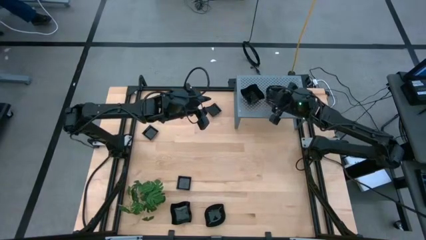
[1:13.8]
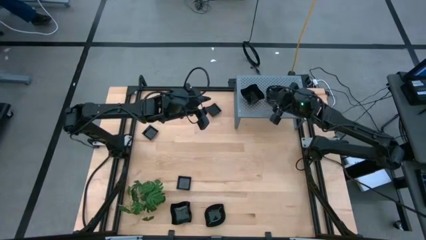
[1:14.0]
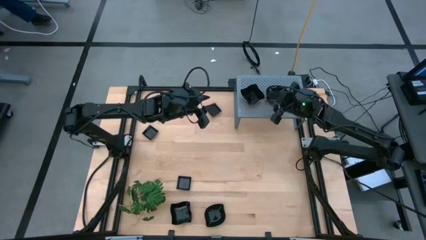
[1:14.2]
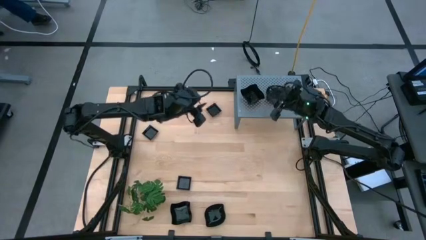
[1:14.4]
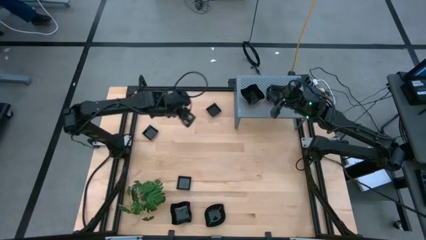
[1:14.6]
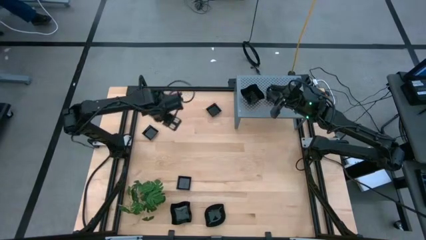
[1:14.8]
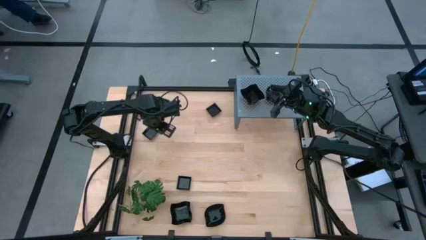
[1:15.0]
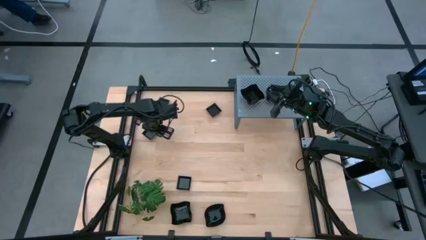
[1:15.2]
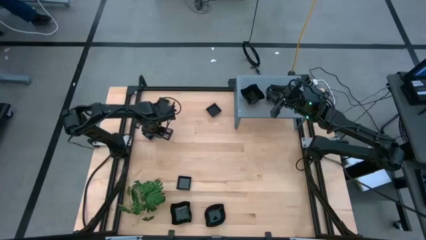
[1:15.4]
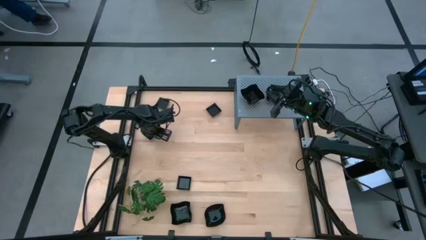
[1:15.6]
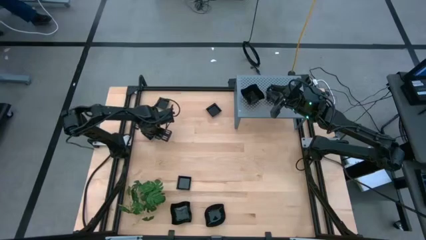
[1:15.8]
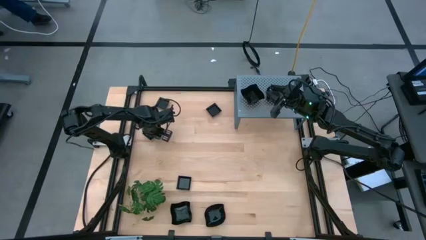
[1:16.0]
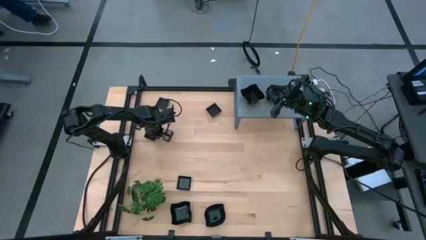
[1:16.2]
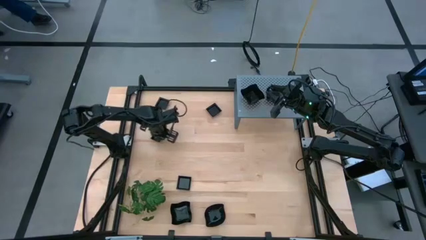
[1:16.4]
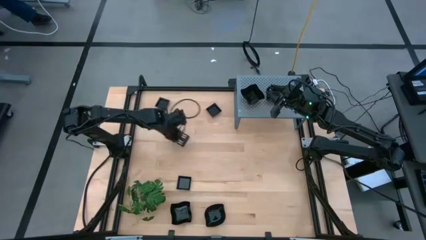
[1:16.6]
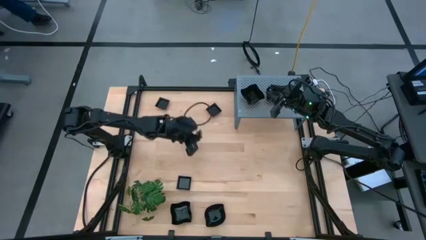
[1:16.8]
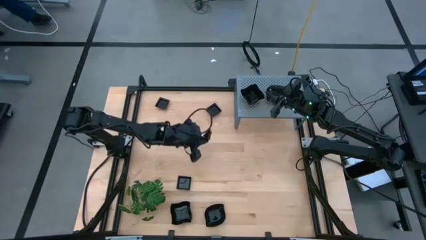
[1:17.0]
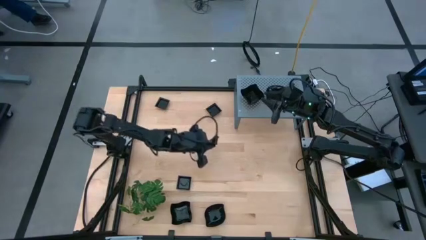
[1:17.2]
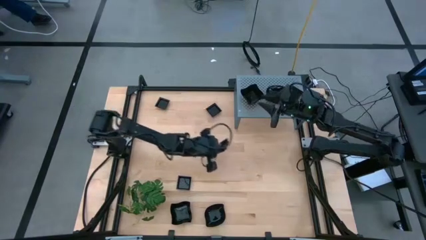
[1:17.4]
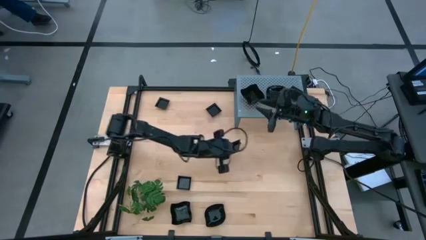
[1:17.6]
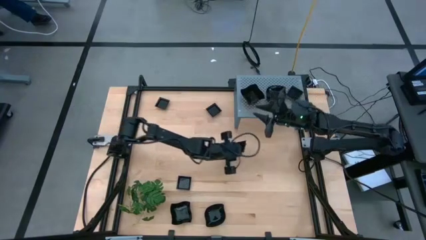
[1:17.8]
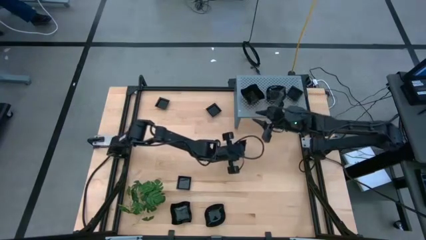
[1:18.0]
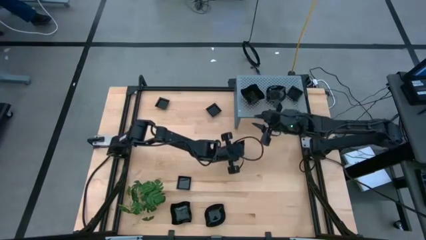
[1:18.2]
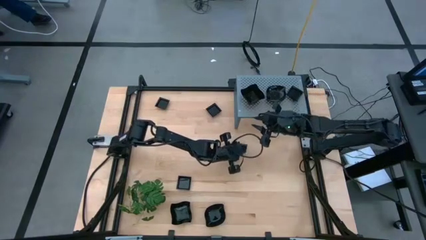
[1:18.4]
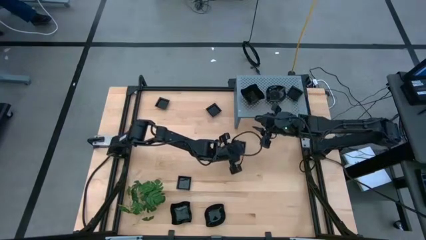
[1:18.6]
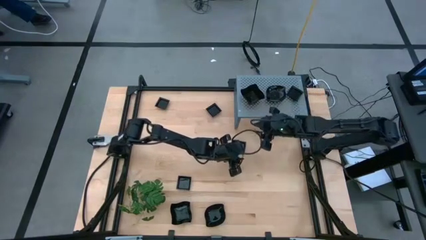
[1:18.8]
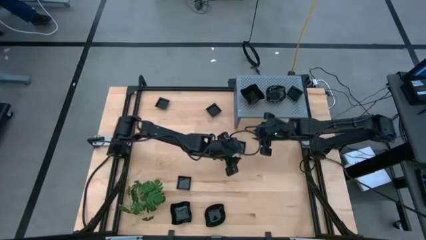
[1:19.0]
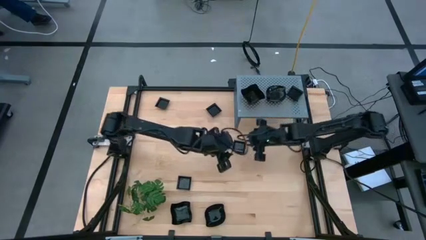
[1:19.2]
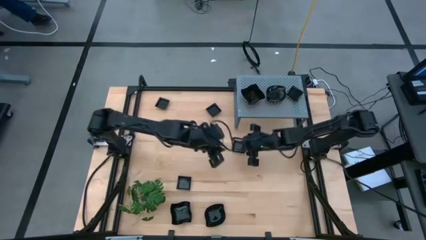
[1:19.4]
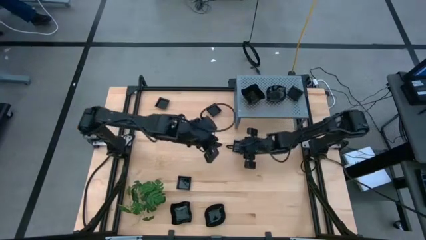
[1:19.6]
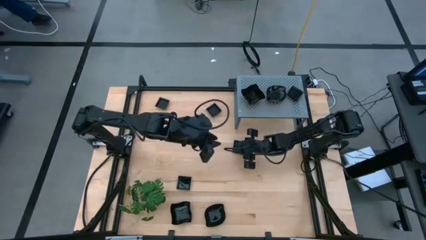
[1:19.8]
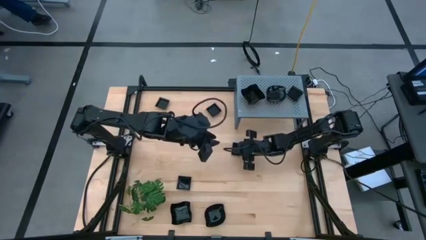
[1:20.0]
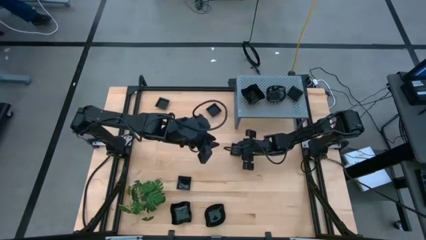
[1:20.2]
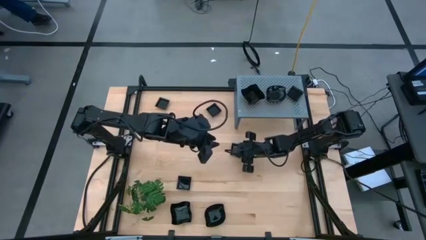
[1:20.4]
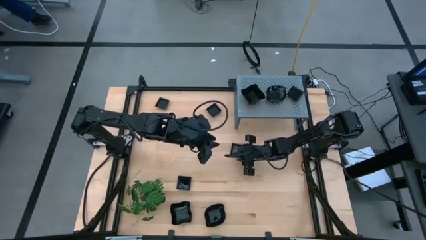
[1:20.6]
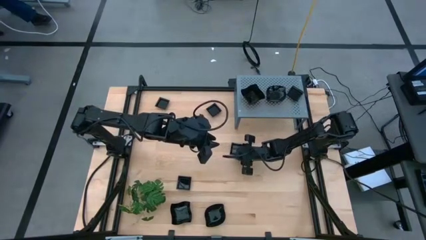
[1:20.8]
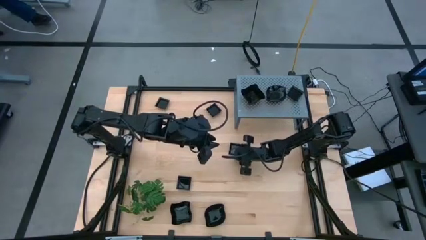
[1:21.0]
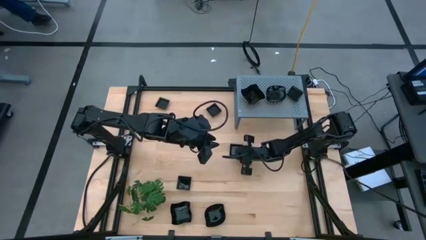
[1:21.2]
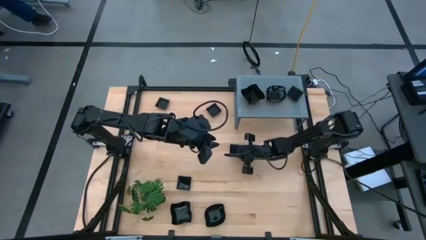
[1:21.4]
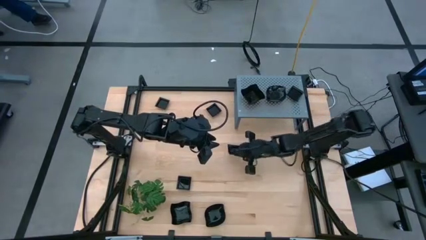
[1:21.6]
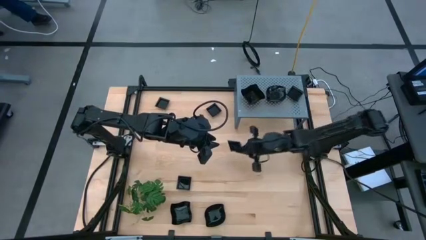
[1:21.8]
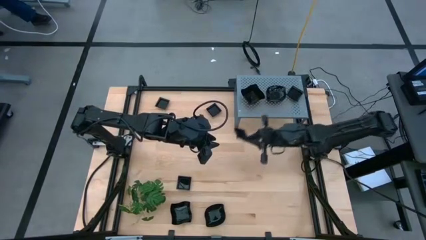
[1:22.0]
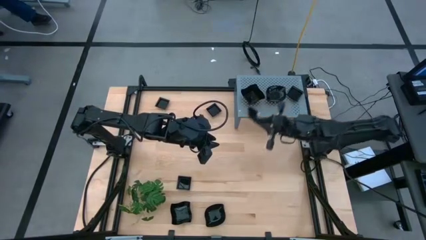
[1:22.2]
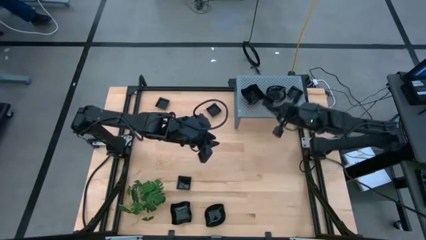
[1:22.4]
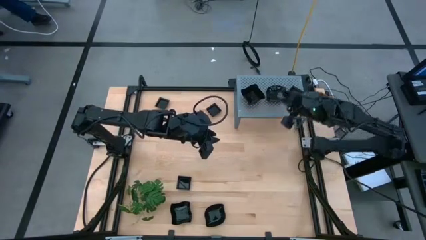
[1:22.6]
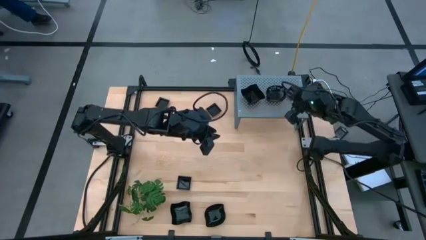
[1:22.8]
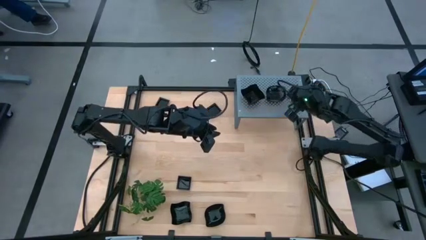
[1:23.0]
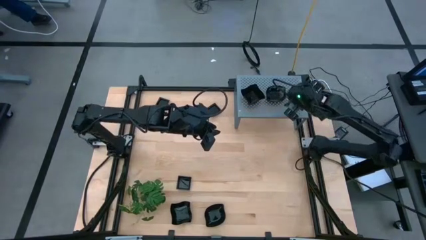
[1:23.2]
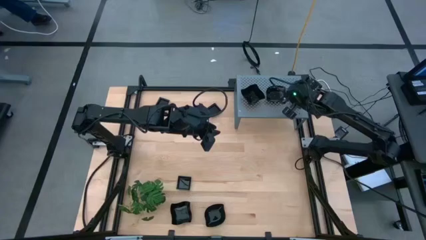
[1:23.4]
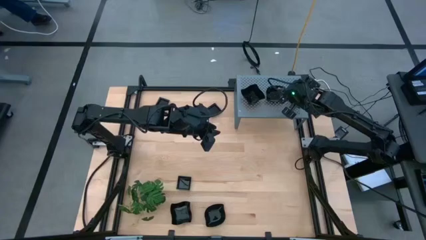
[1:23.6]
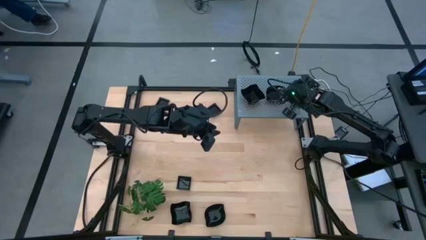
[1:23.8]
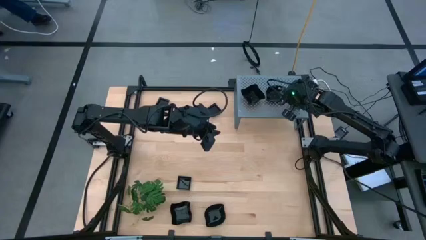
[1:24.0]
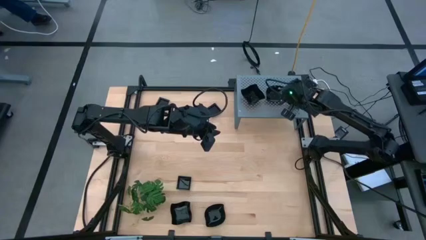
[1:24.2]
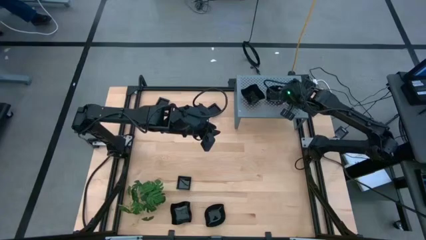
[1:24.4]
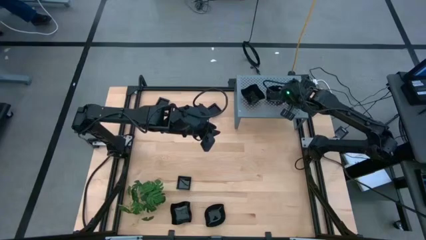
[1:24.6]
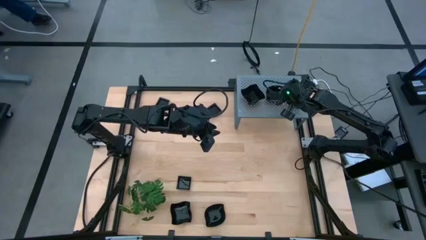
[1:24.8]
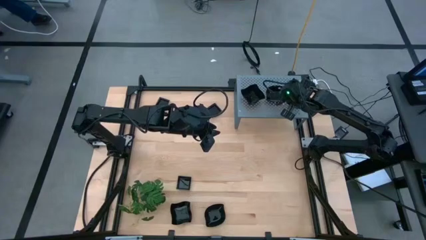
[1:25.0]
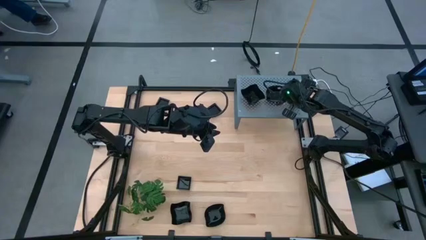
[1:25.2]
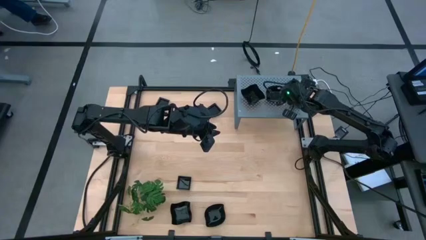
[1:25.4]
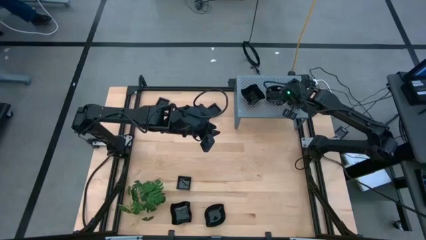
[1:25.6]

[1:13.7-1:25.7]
Task: Pick & Place Mini shaped plates
Stack the black square plate on top of the black square plate on the shelf

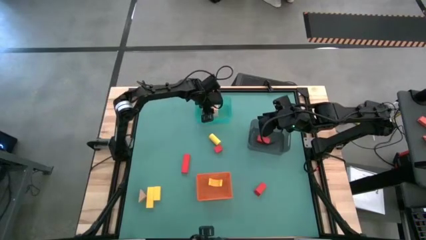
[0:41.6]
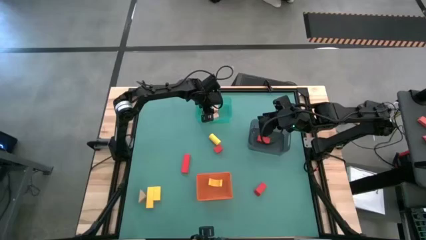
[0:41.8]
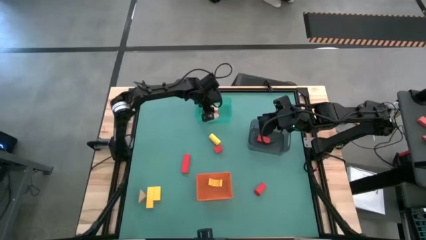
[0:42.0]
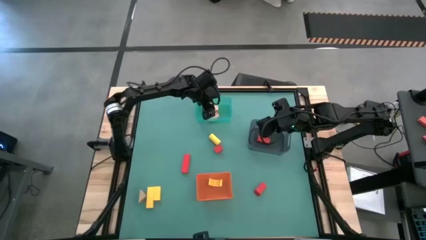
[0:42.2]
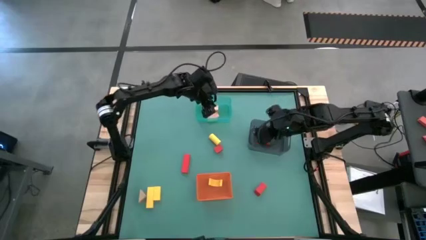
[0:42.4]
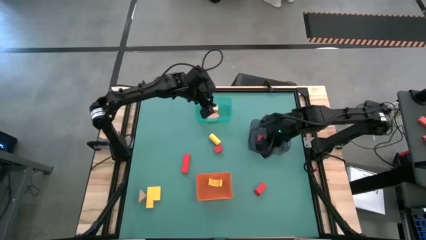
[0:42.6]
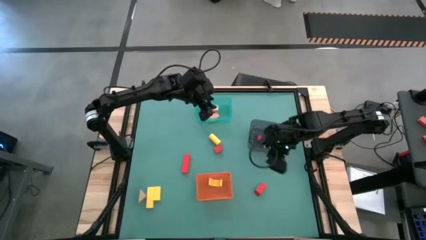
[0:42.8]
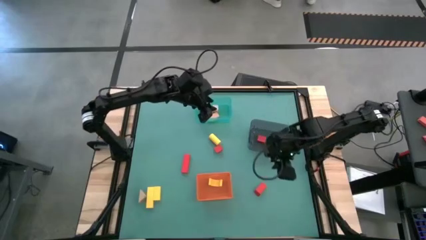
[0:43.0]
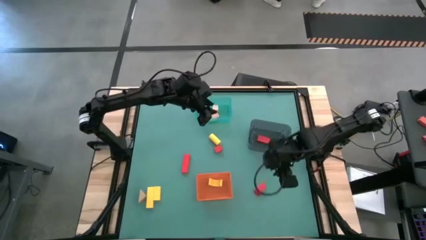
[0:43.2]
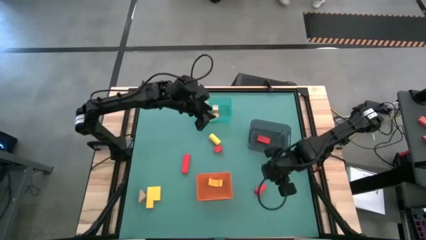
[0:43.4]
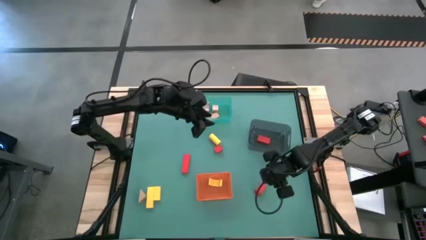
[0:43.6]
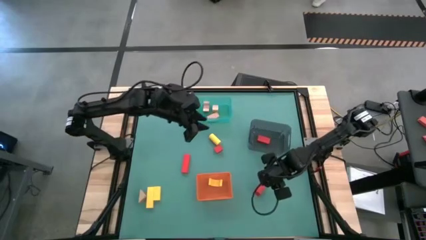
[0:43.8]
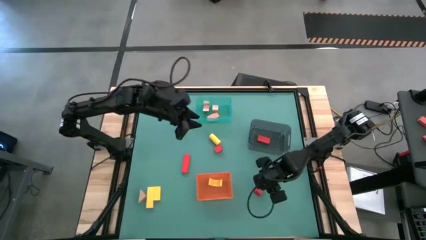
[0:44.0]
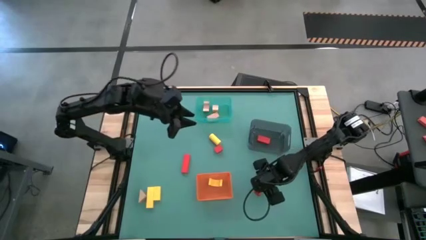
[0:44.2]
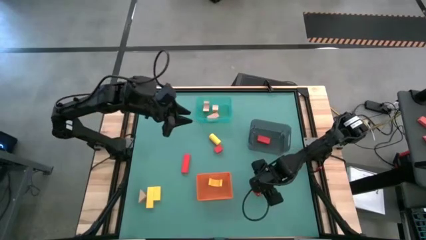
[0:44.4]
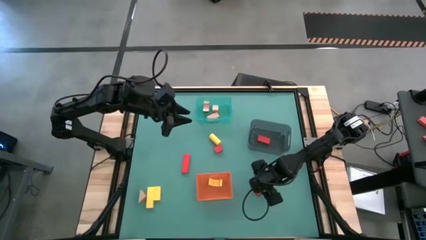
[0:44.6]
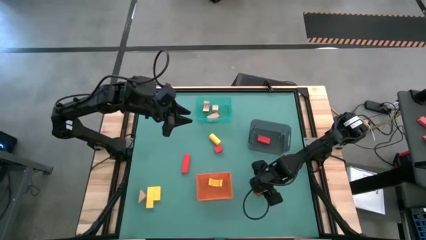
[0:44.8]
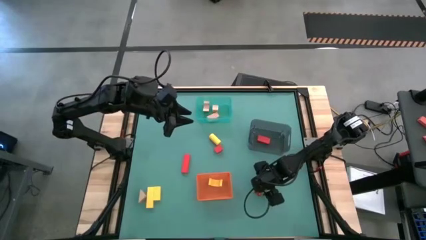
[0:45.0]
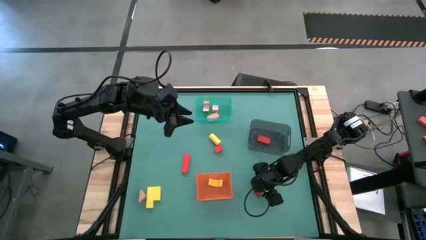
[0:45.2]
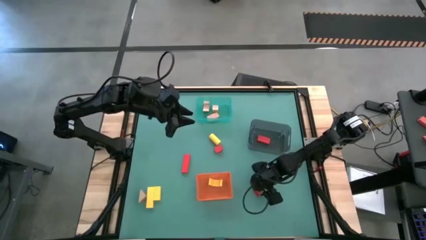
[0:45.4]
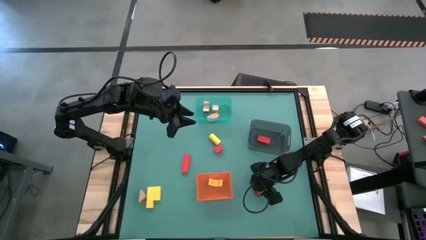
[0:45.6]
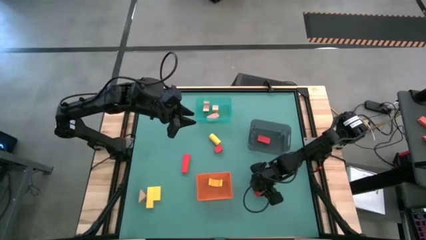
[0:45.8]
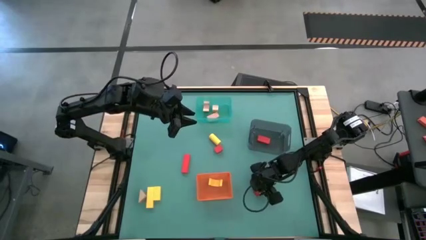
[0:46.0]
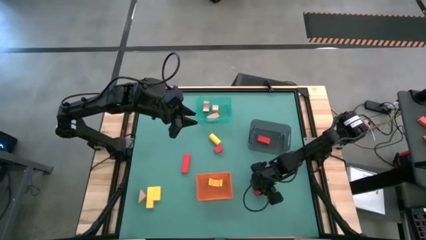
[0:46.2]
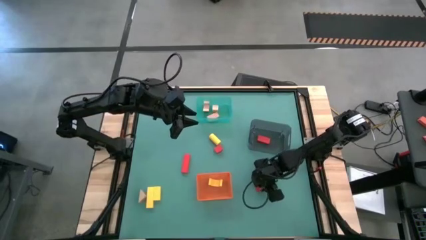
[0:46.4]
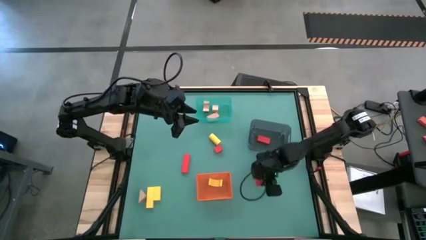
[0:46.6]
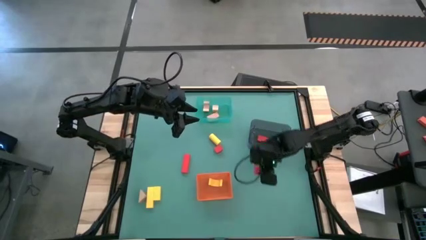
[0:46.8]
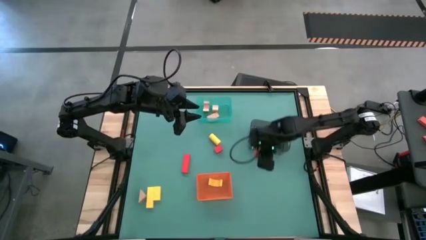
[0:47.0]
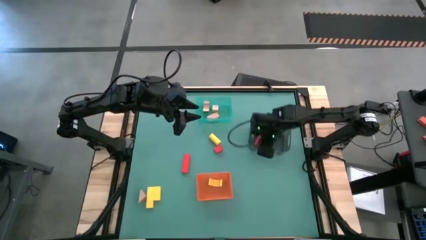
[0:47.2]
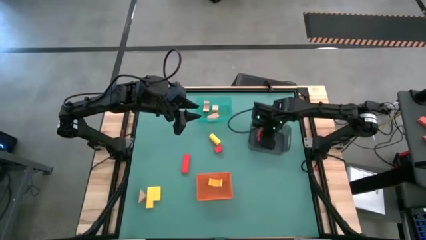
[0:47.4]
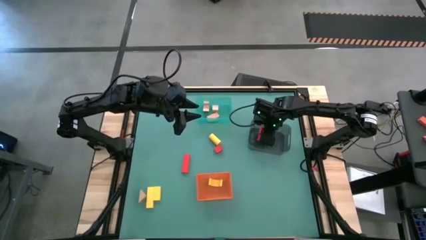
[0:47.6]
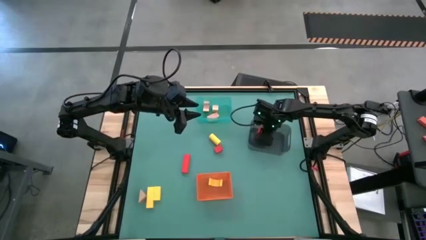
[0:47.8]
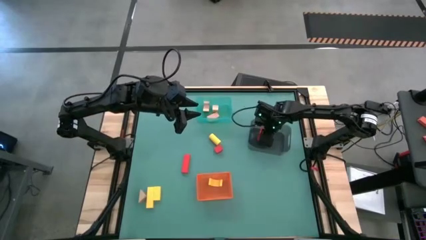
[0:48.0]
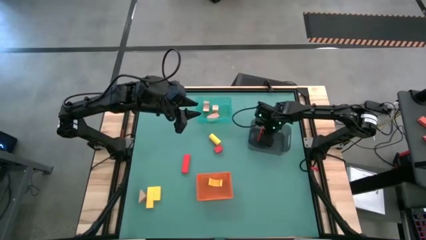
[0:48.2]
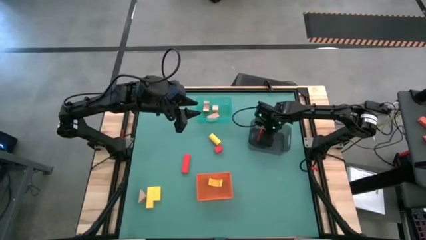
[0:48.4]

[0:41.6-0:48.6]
Task: Sort & place blocks by color
Put the red block into the black bin
